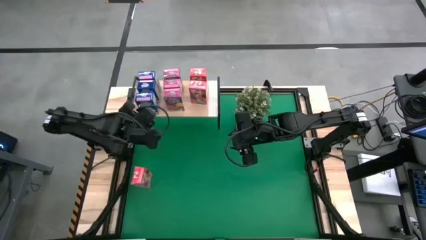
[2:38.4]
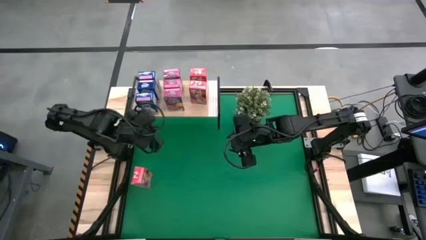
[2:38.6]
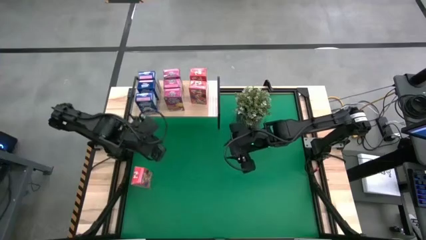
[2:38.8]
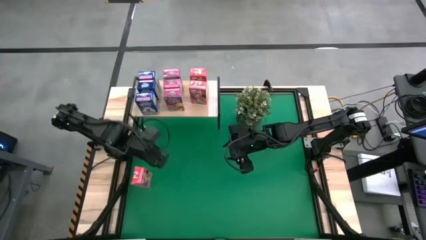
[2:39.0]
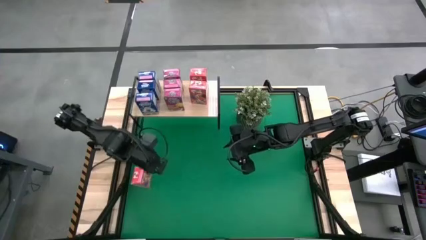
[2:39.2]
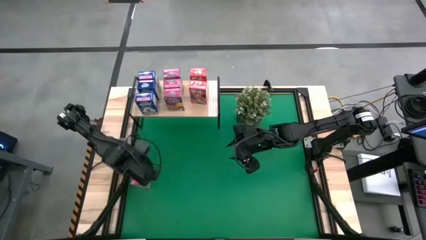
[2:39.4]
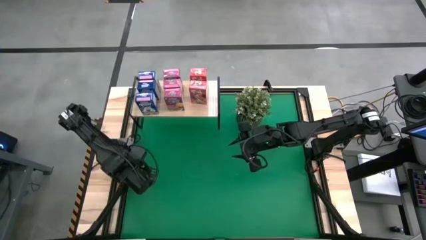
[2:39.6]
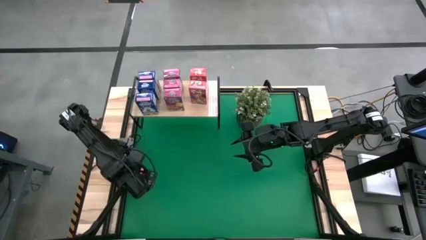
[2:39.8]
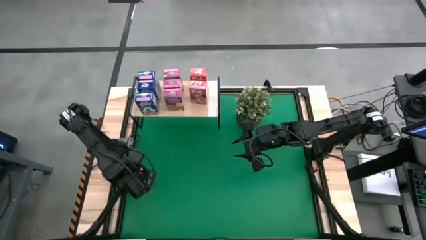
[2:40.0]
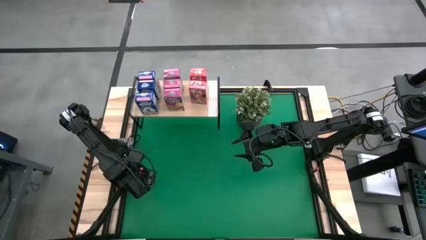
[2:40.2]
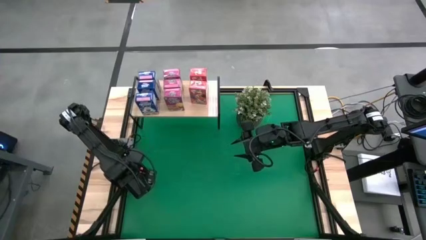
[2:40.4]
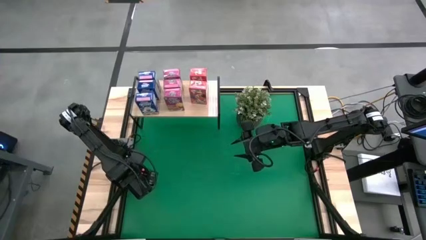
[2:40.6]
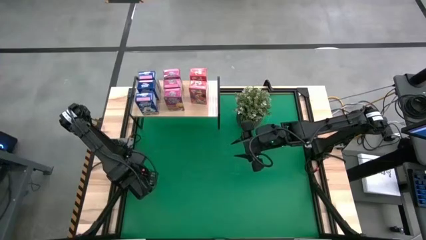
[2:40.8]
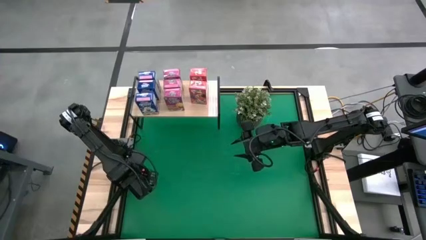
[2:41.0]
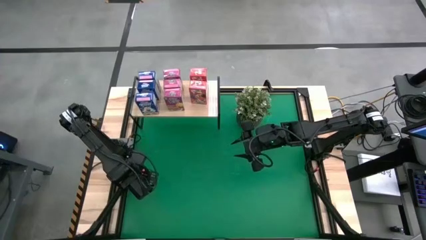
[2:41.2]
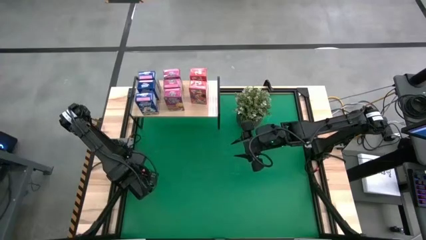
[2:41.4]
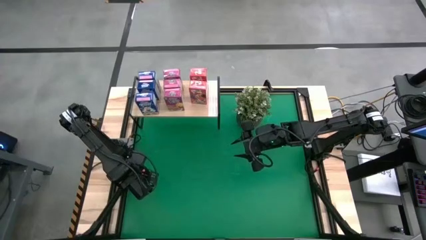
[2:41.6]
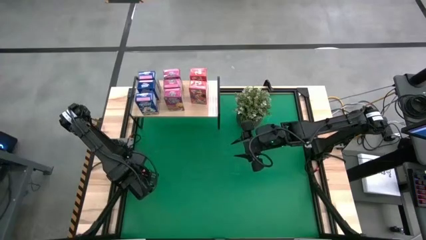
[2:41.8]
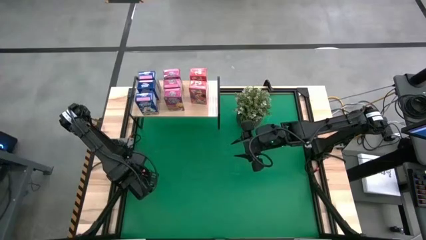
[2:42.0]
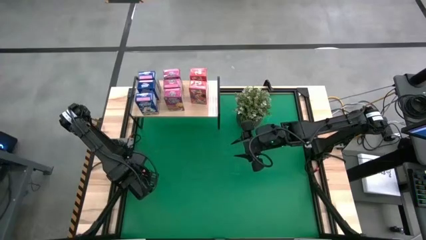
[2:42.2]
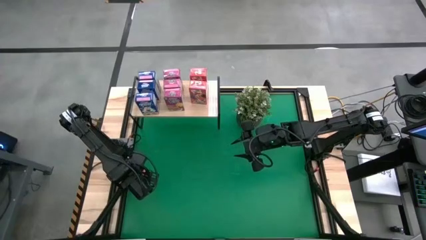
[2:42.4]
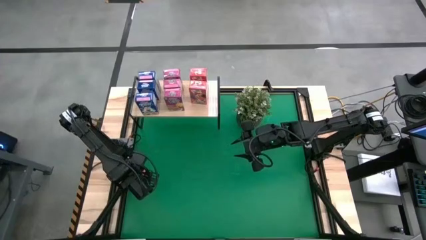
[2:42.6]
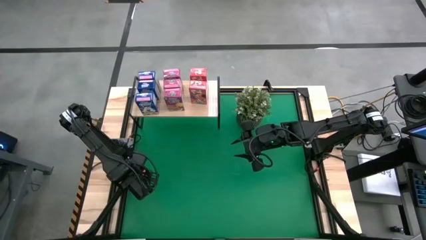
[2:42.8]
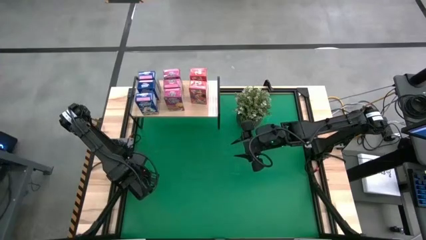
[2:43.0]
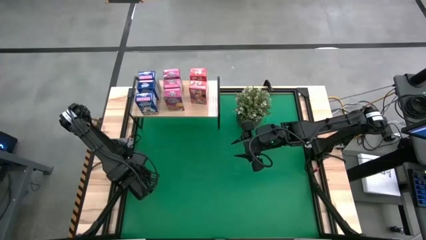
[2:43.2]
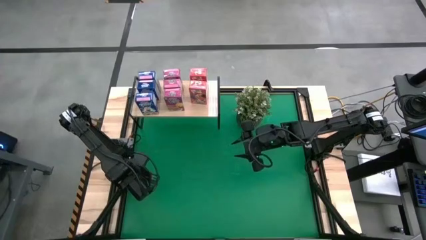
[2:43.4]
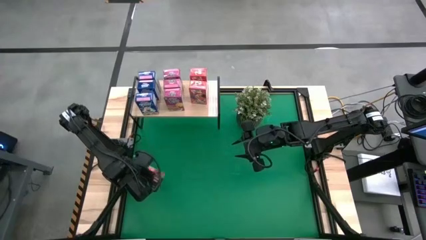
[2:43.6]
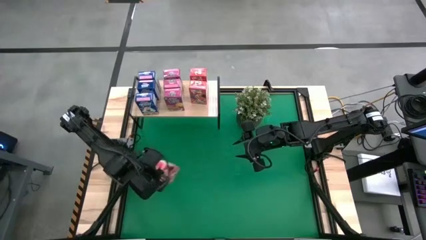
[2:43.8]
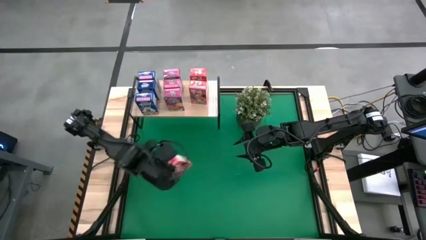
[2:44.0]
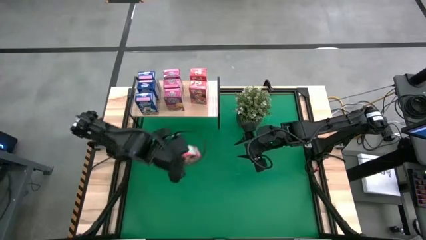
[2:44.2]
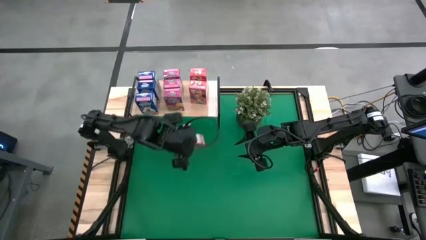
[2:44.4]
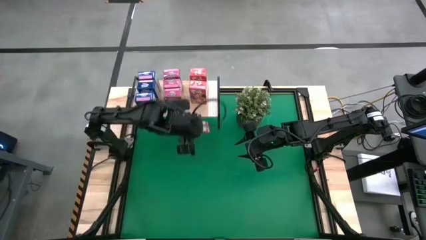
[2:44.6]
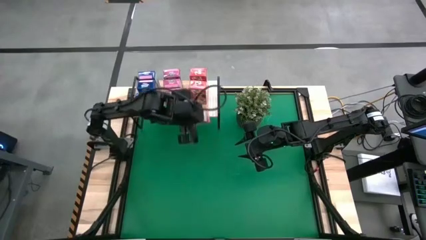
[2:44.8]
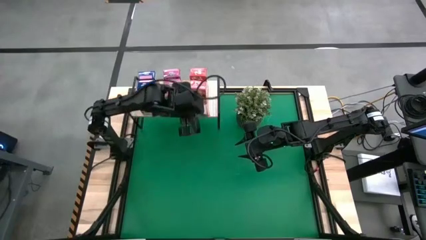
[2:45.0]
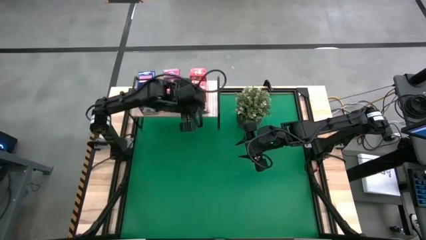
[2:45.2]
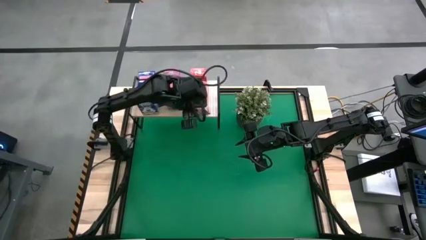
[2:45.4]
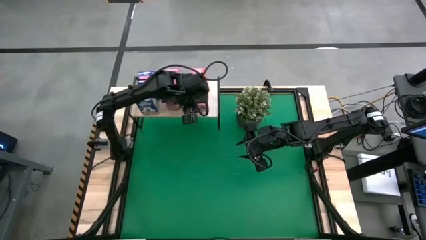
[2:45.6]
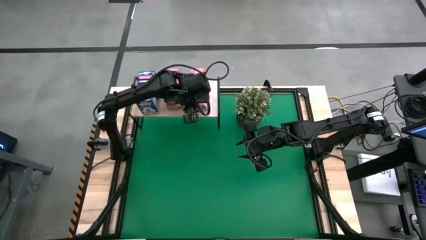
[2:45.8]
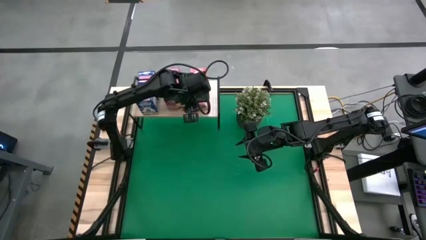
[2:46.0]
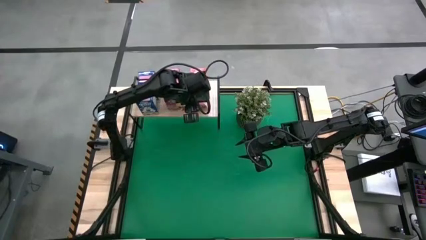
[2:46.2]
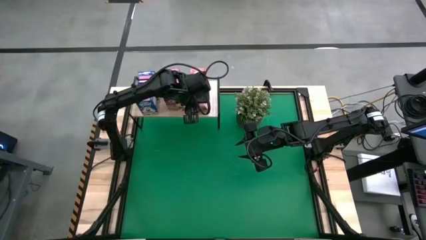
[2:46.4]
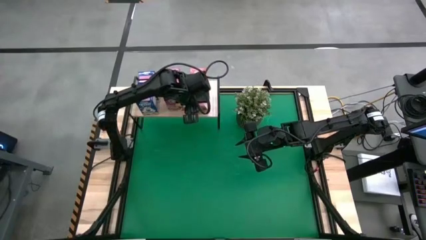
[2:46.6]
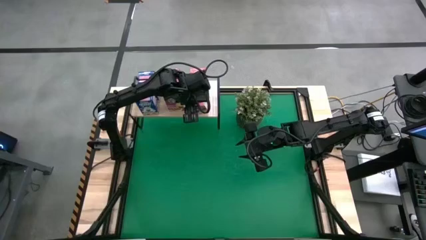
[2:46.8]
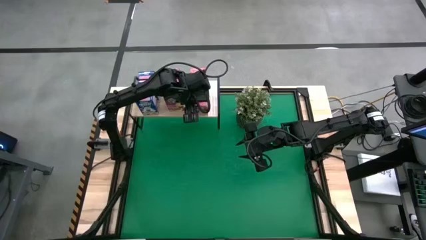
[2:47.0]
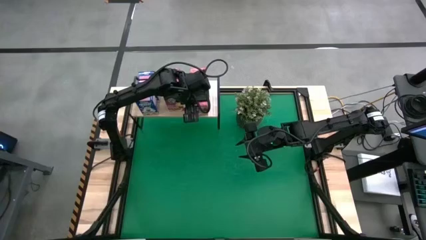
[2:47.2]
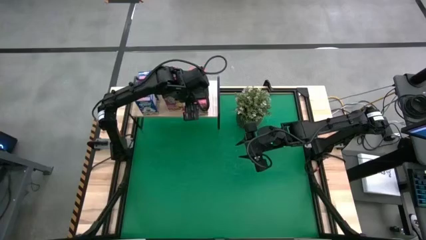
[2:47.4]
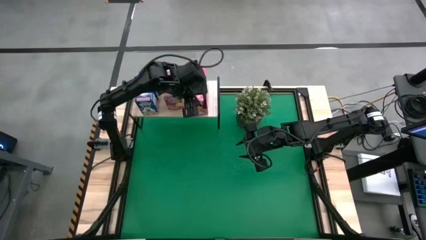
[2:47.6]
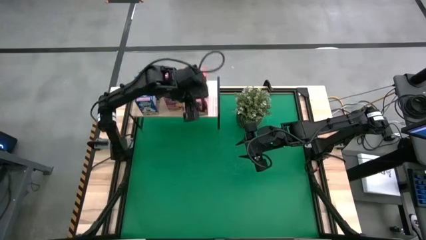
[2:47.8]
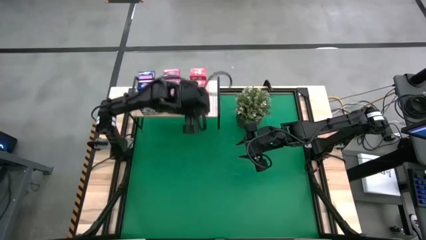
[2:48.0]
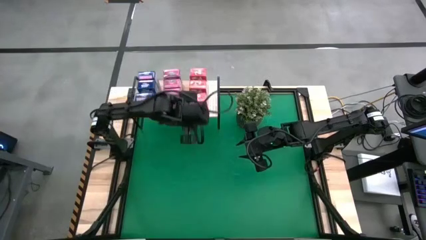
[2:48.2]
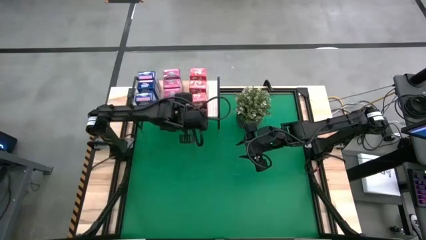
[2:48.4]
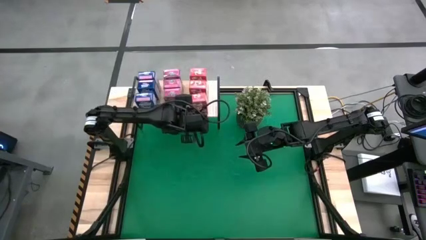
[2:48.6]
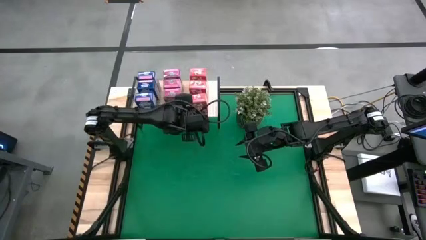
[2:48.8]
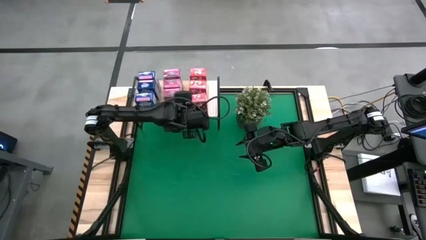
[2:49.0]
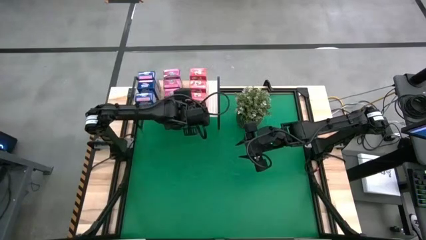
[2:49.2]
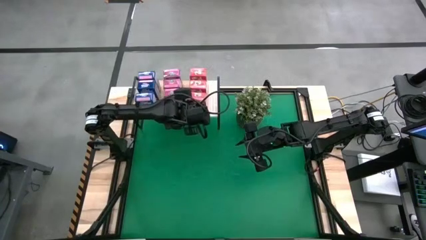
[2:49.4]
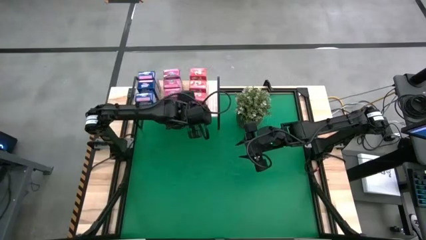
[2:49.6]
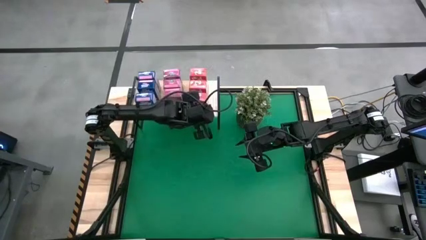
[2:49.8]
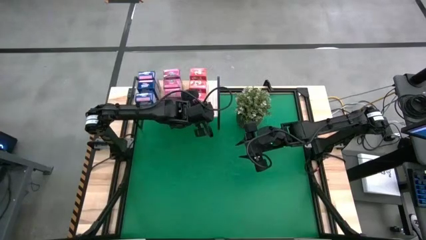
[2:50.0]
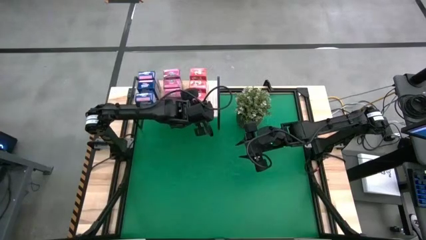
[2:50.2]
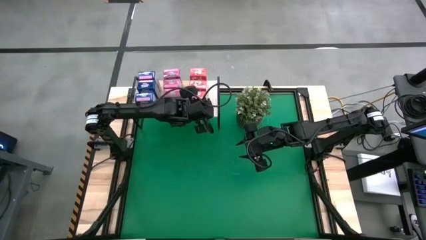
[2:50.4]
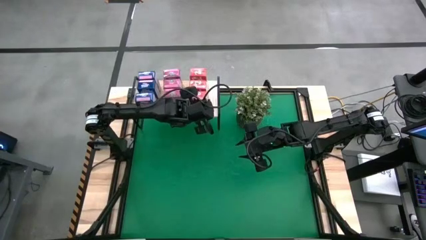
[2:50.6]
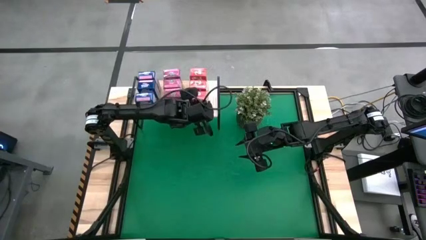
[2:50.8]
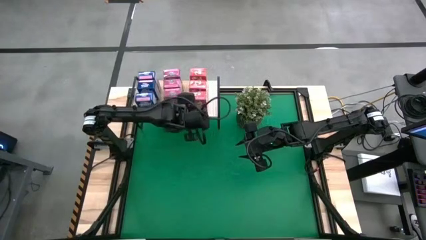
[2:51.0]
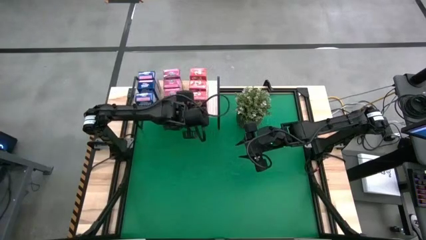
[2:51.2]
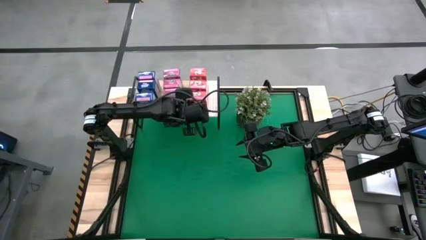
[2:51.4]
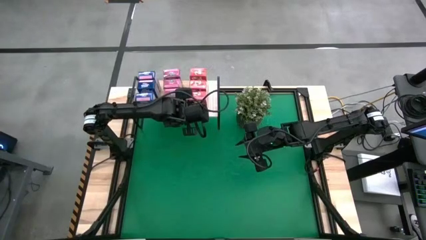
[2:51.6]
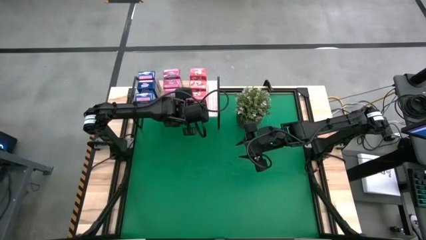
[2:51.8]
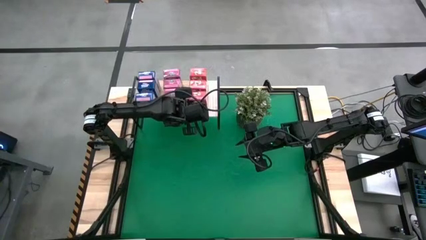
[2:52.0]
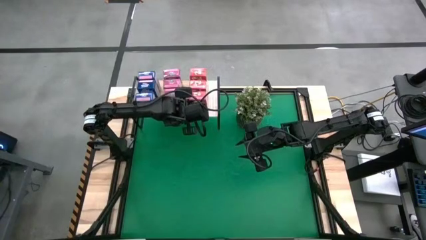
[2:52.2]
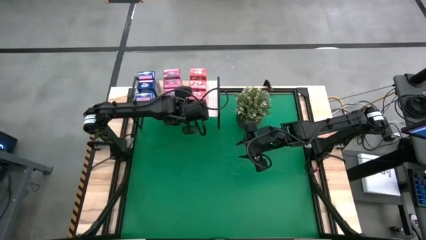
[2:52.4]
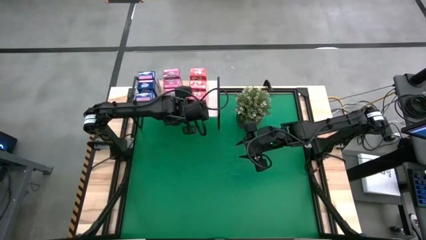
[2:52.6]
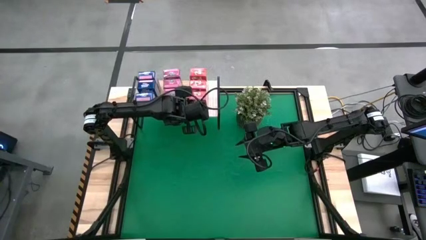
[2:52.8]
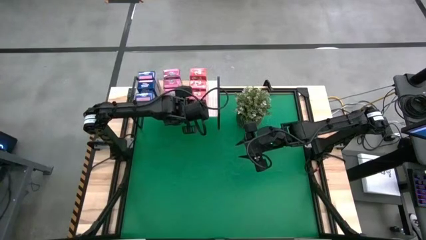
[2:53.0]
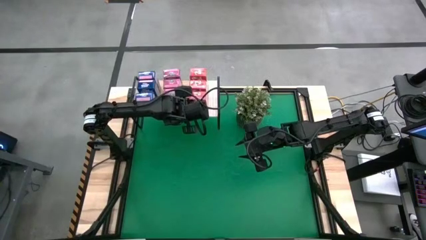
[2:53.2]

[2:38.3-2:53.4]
Task: Stack cereal on shelf
Put the red cereal box on the shelf

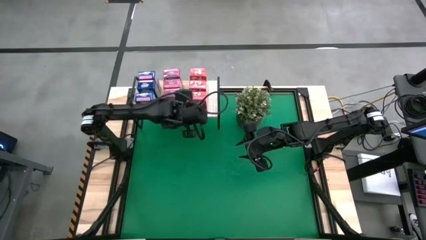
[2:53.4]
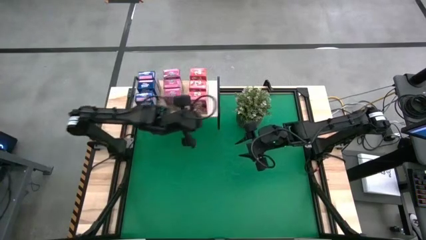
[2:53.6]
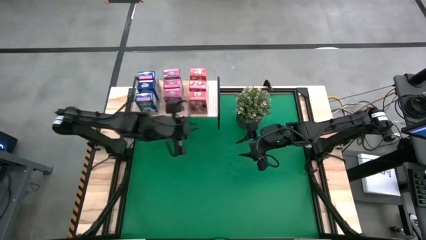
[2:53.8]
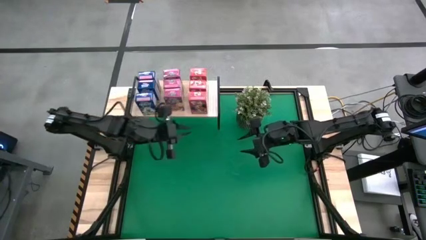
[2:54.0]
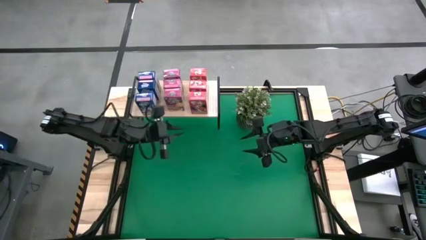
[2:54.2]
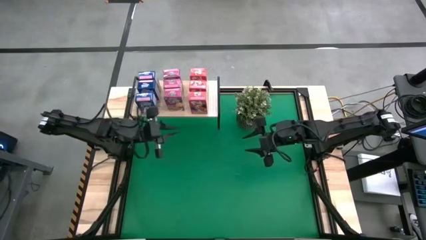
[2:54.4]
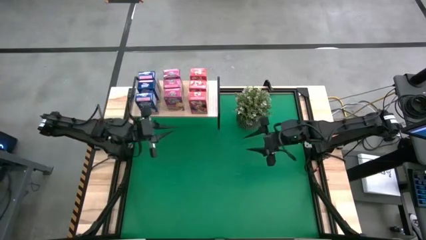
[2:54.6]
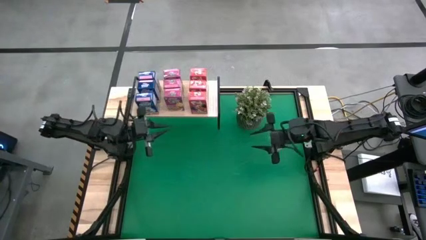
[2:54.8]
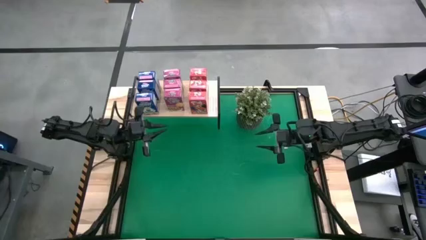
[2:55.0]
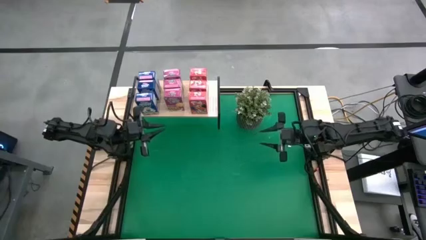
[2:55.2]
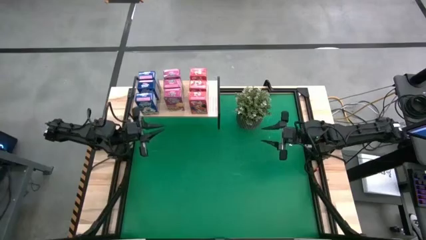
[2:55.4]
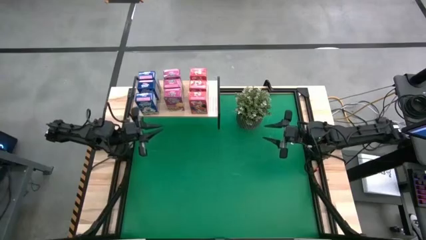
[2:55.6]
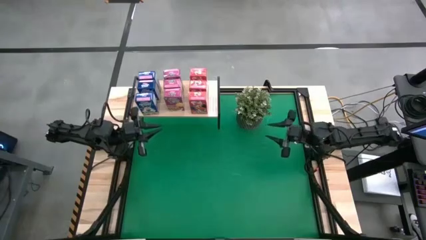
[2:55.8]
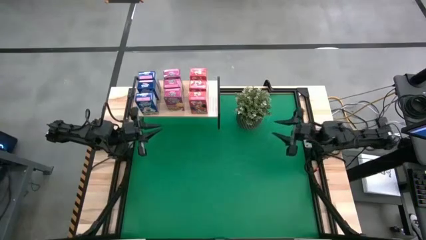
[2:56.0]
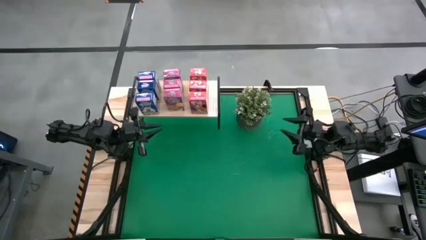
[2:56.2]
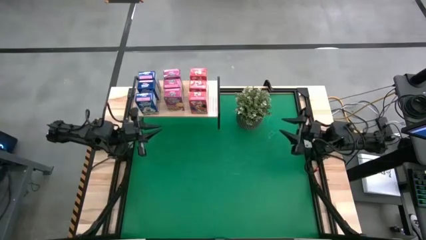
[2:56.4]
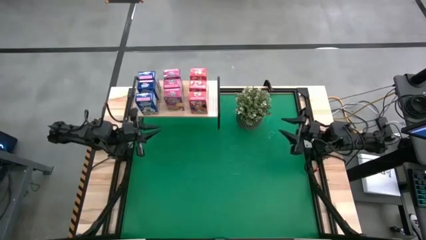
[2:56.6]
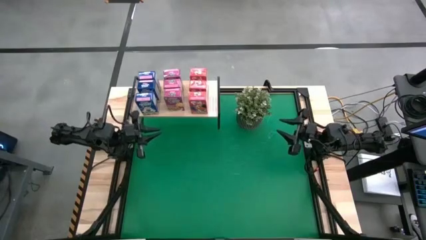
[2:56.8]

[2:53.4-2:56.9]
Return to Home Position
